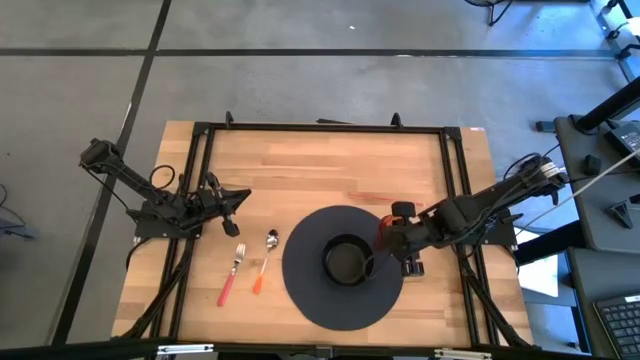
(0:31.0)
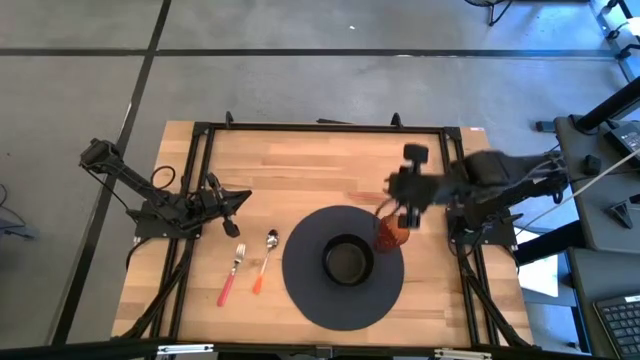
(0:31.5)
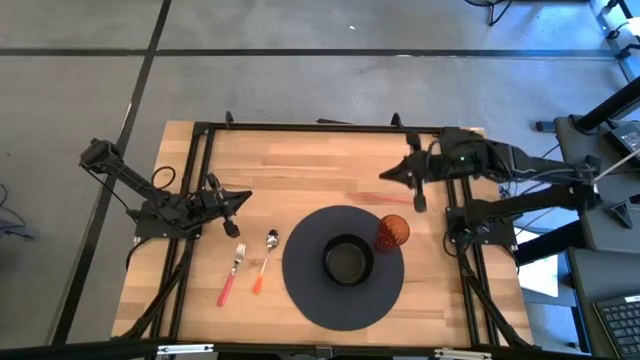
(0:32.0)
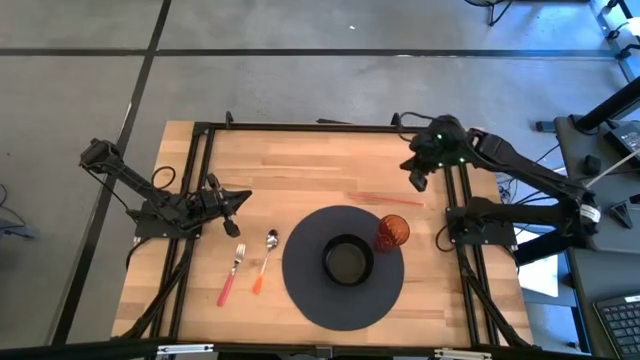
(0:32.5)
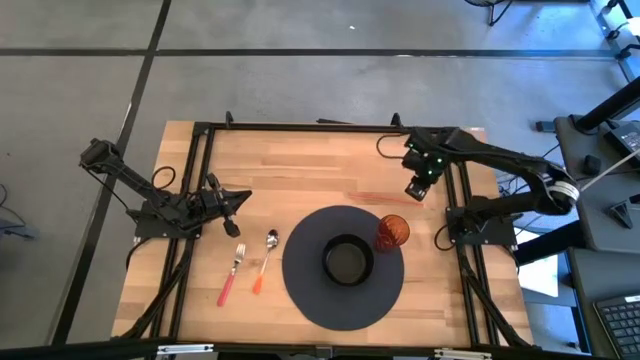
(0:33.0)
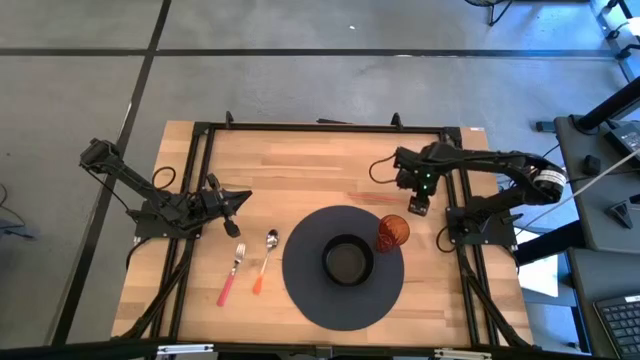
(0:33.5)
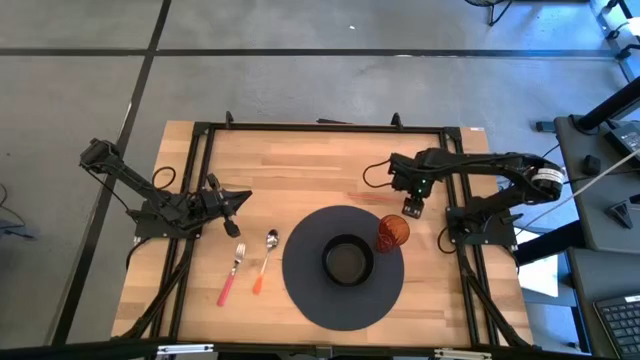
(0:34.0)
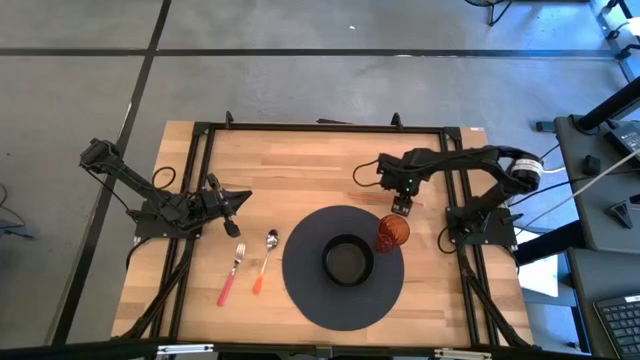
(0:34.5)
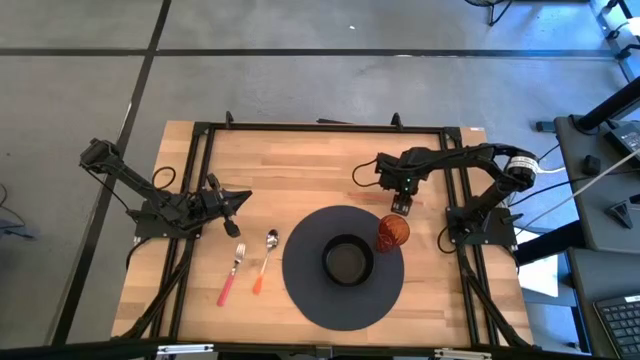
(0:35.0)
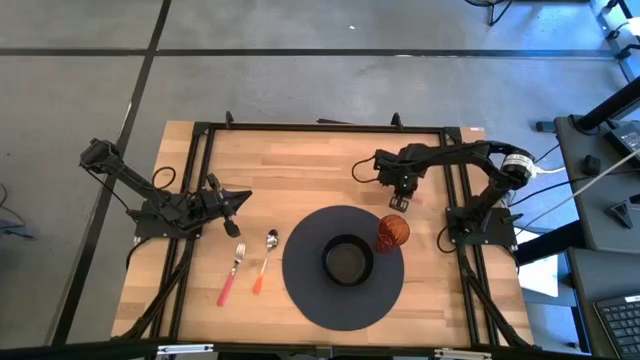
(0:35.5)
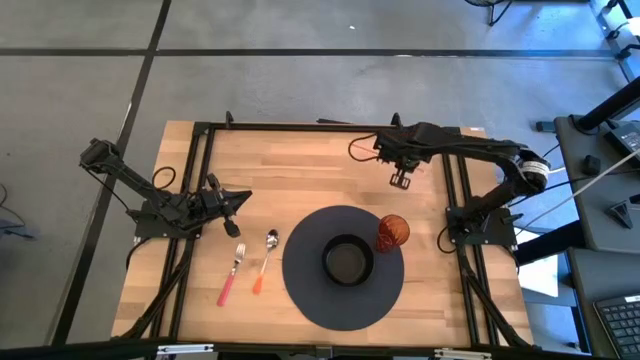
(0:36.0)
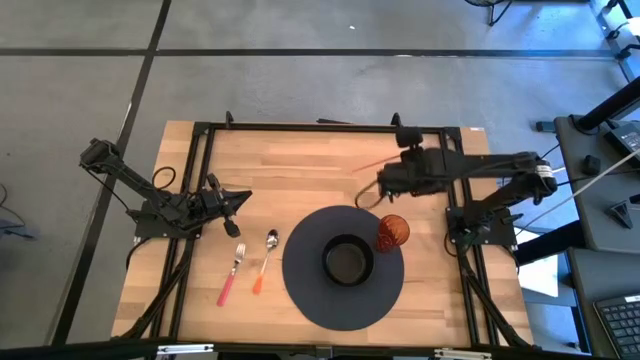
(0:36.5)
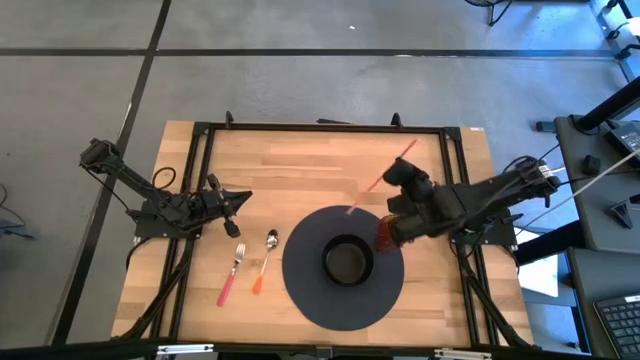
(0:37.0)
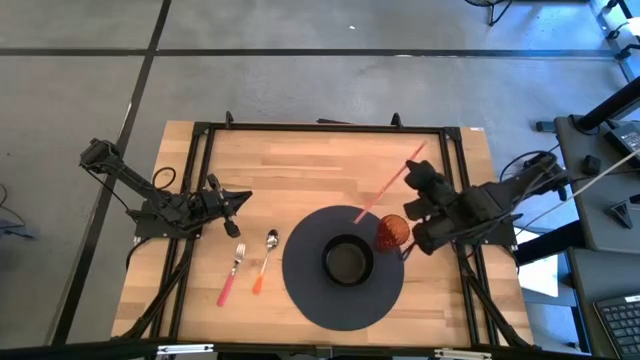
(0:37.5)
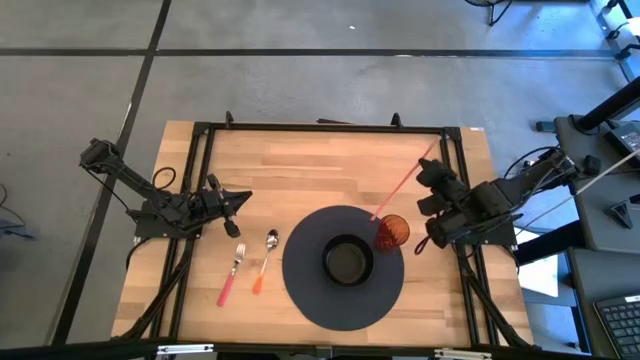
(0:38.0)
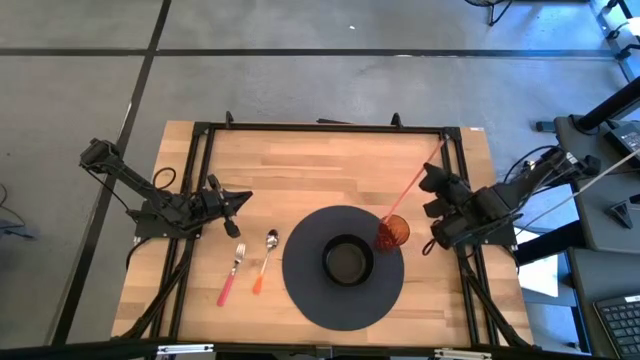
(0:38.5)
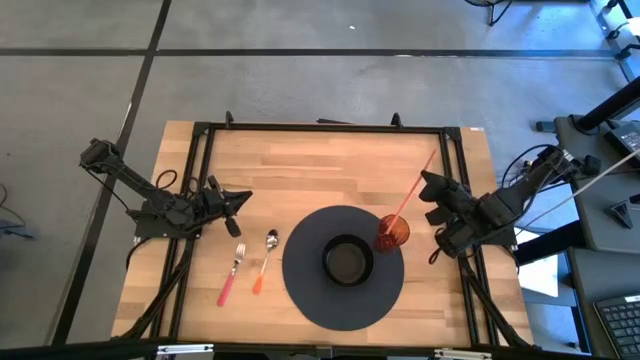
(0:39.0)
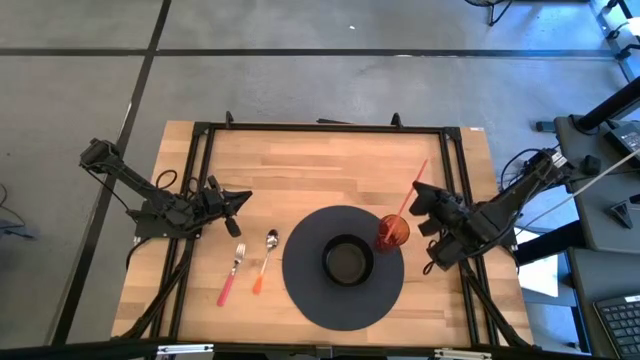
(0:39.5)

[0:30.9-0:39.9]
Task: Pick & Place Utensil
Put the orange straw into the orange cup

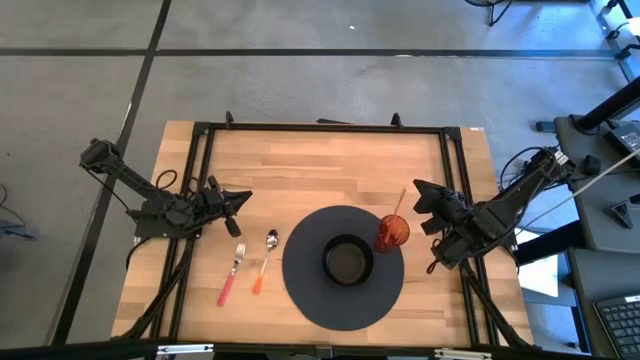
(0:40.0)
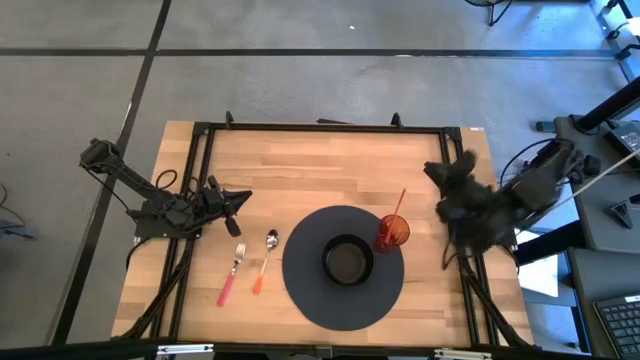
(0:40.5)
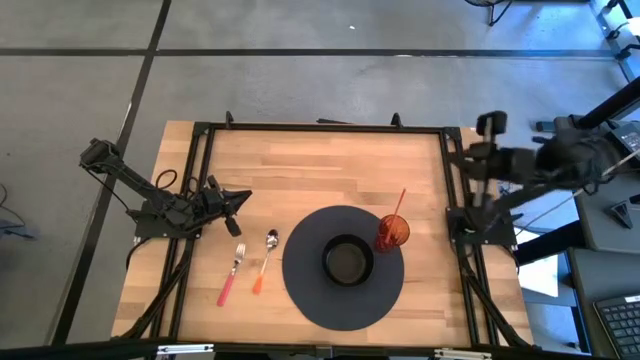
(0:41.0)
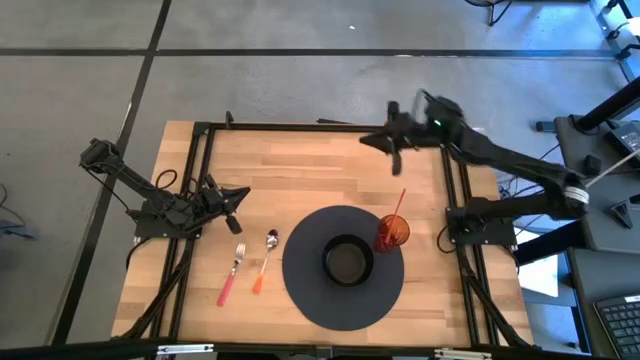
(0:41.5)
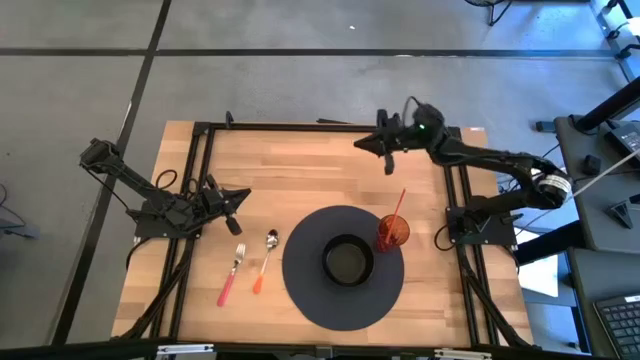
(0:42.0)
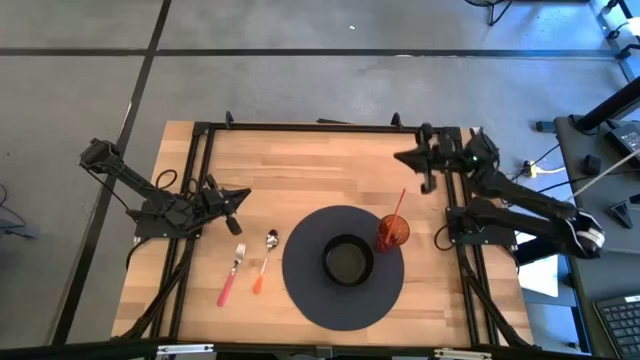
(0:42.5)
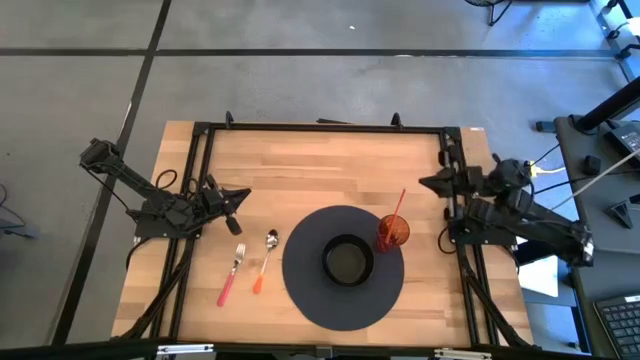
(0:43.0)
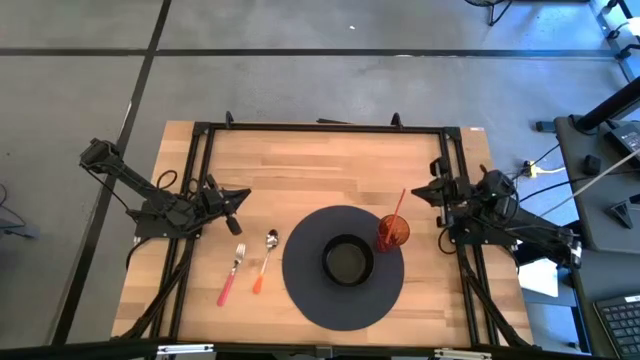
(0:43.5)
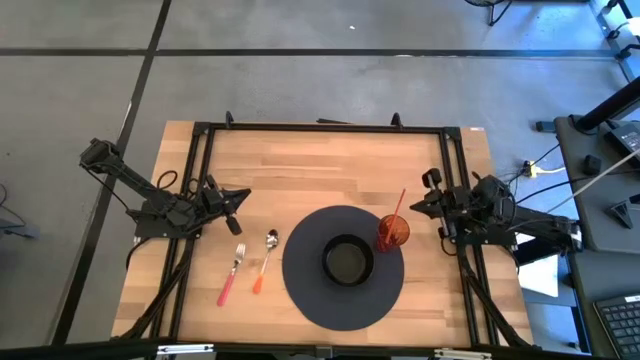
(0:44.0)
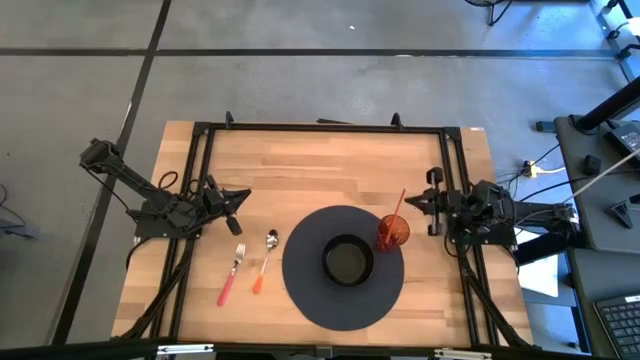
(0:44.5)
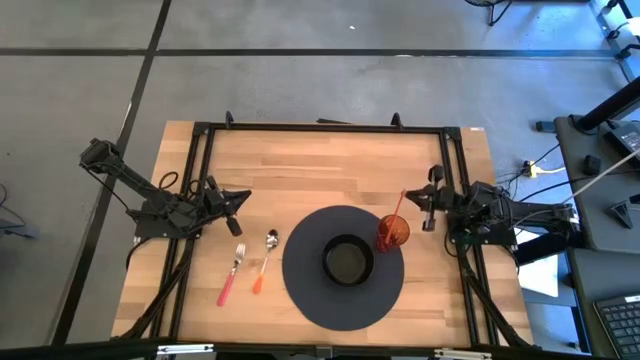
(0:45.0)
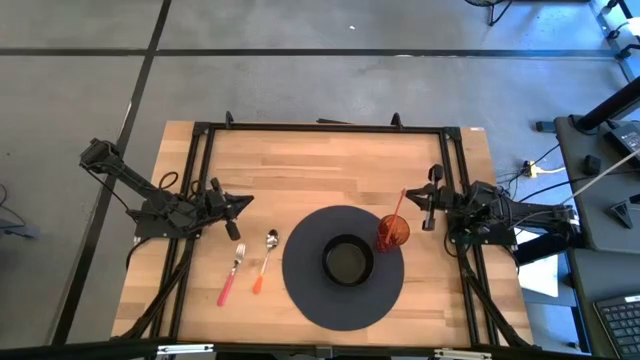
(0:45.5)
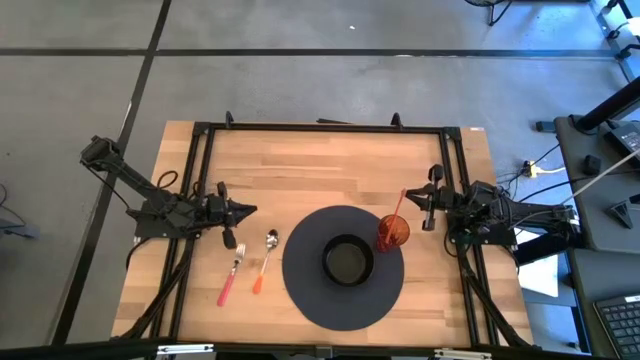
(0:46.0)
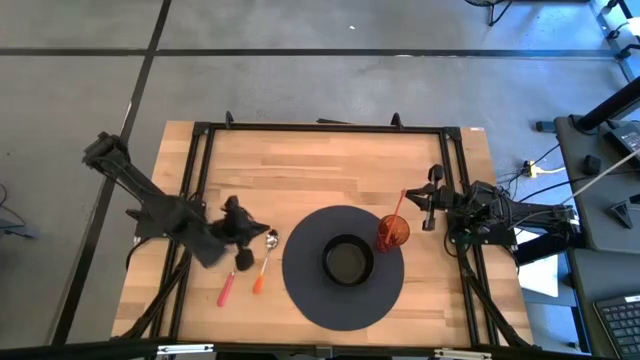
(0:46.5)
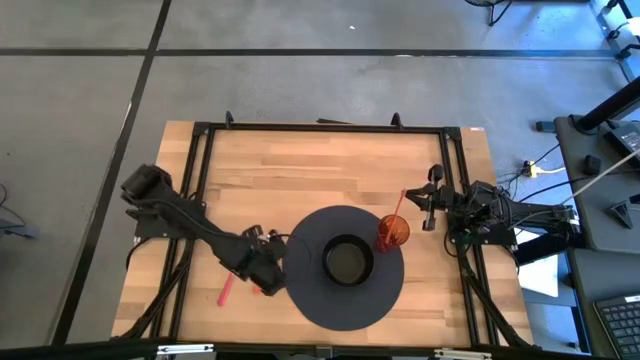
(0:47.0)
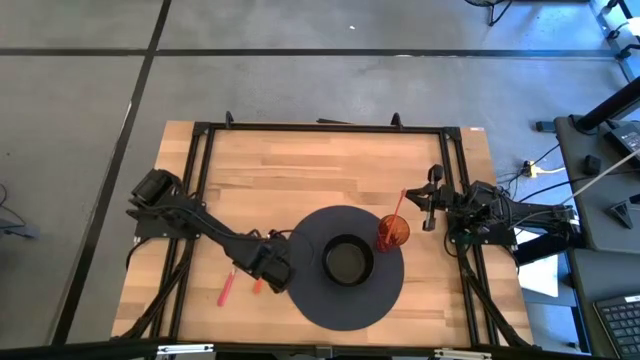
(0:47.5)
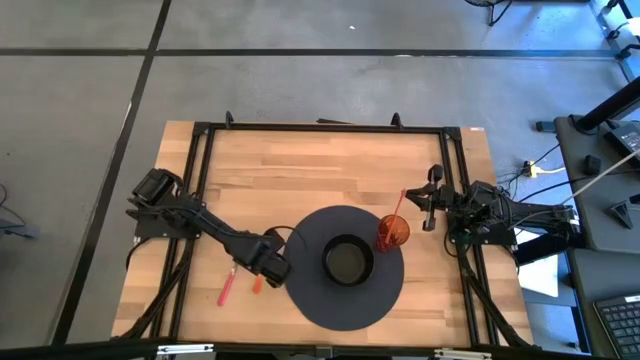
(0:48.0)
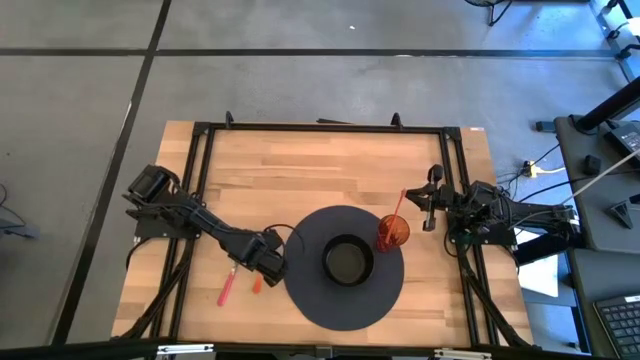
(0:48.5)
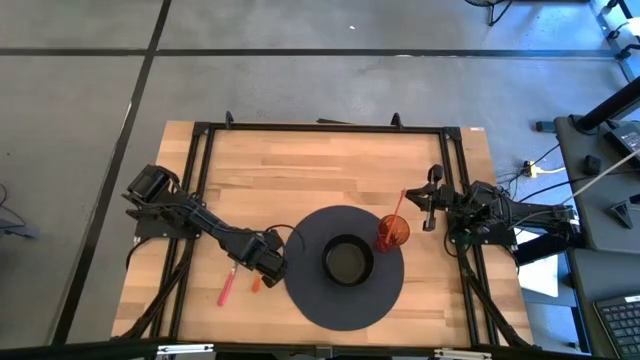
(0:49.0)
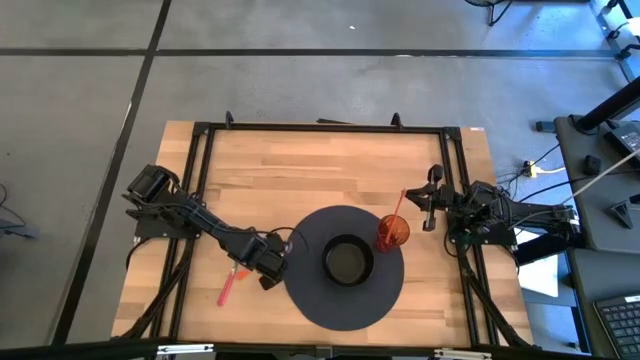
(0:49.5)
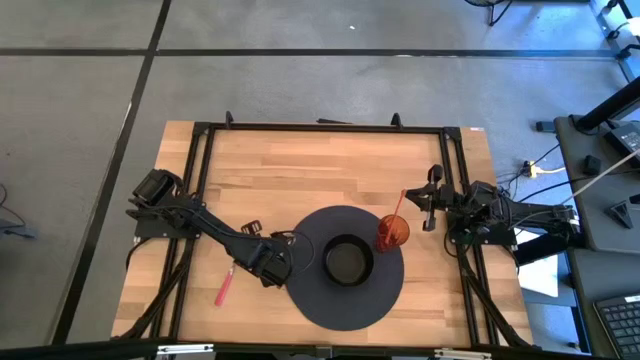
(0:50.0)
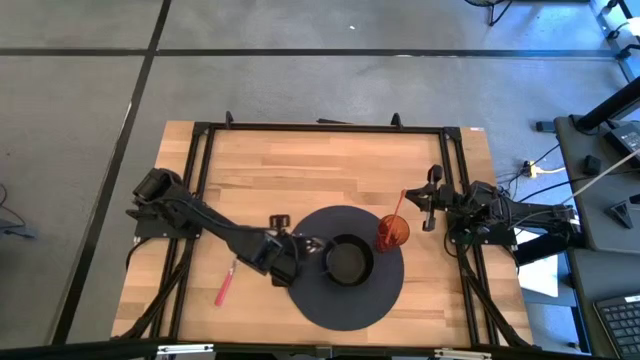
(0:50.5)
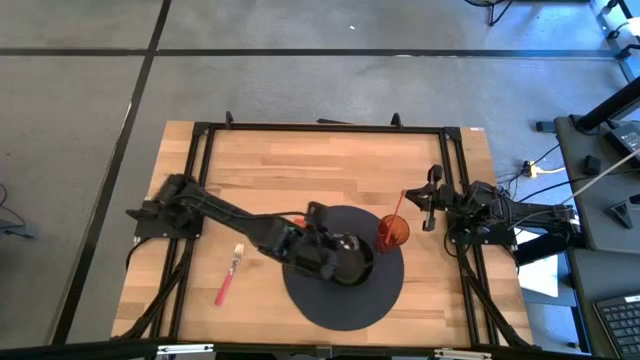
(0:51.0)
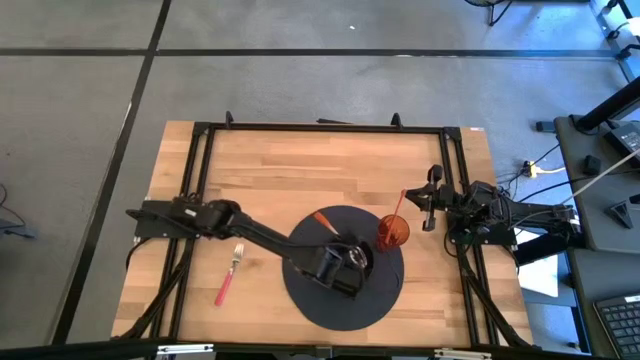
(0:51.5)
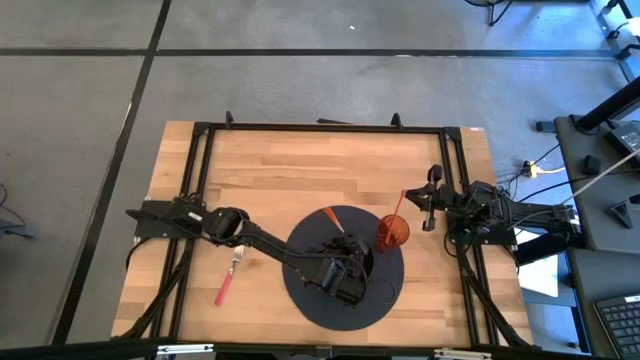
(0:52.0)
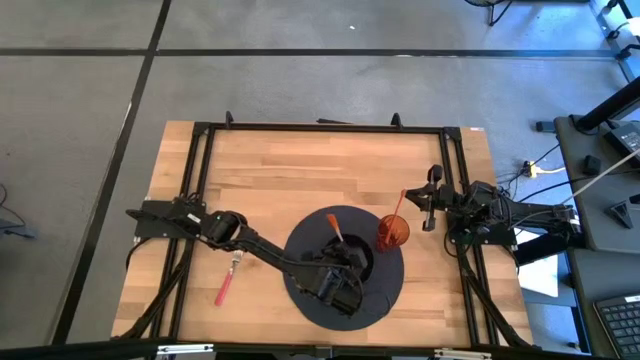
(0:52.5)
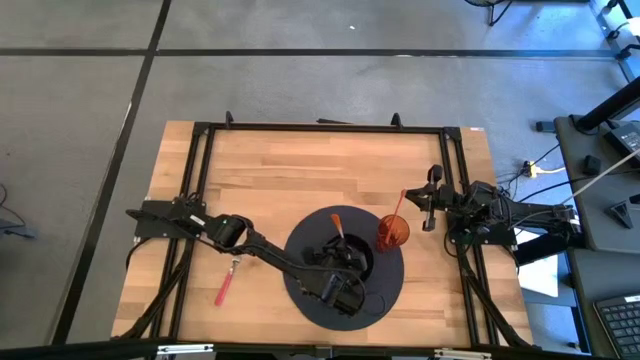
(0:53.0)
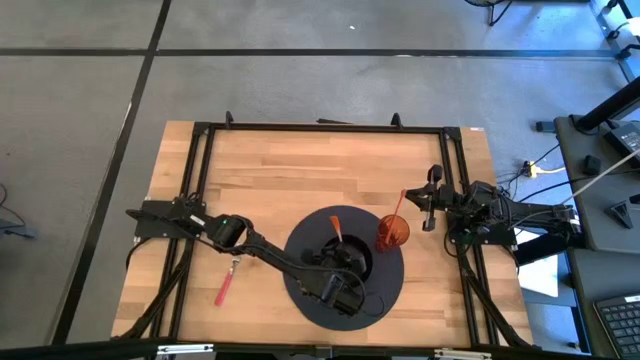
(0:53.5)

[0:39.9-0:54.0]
Put the orange spoon into the black bowl
